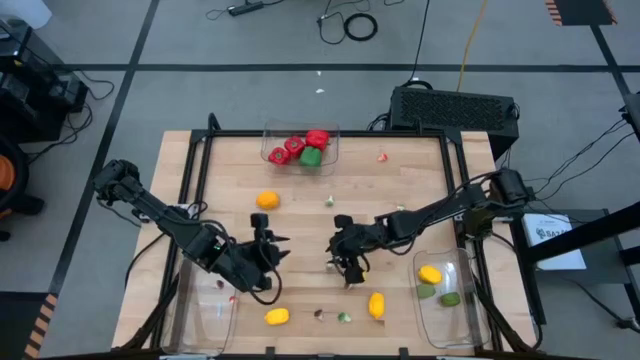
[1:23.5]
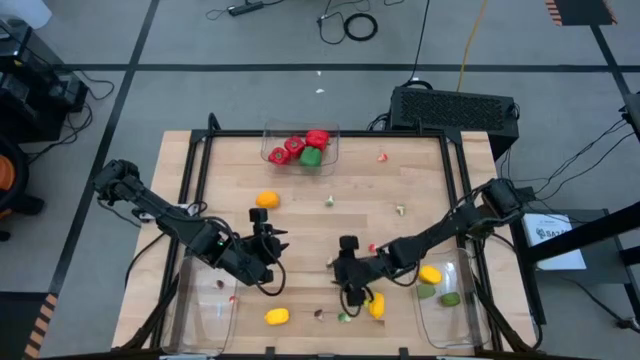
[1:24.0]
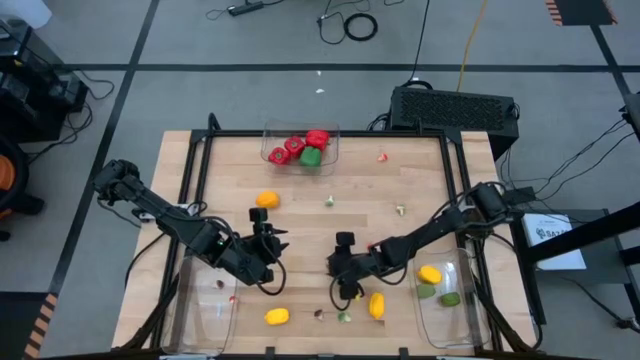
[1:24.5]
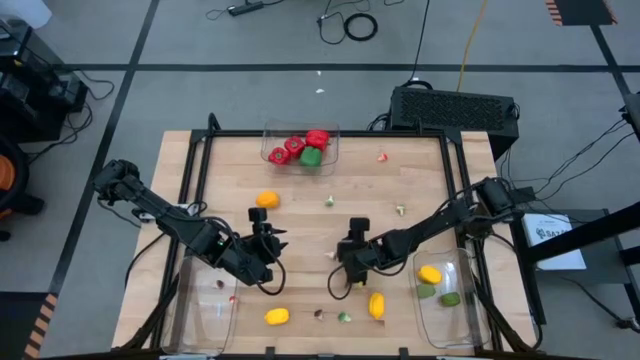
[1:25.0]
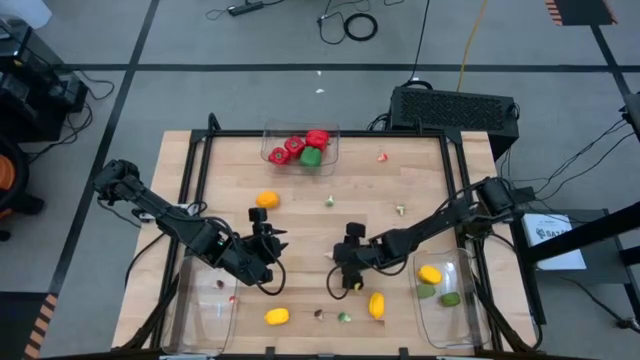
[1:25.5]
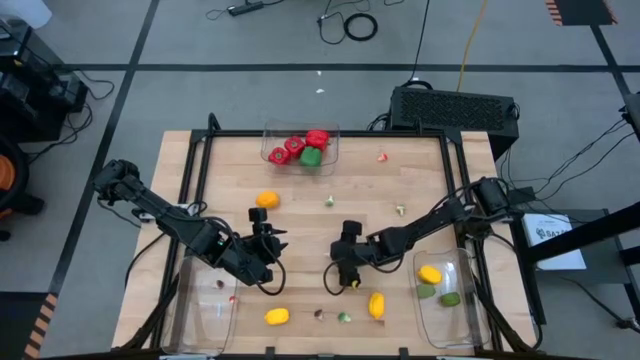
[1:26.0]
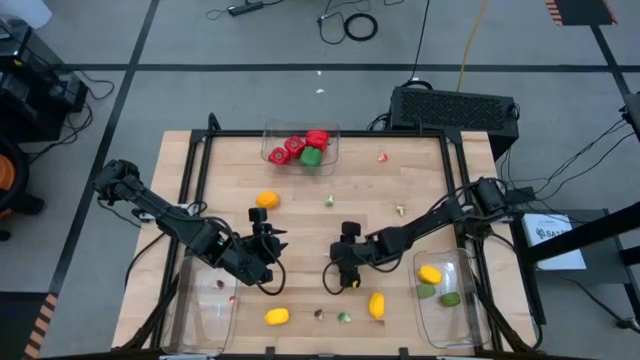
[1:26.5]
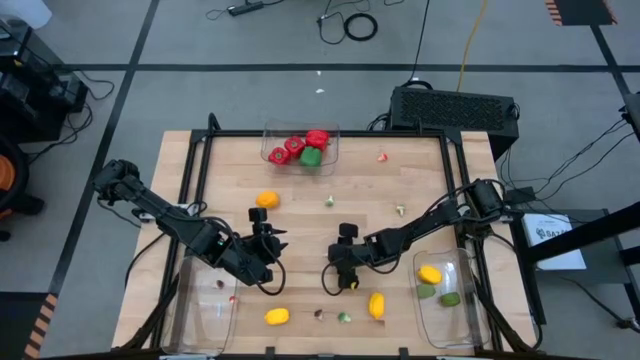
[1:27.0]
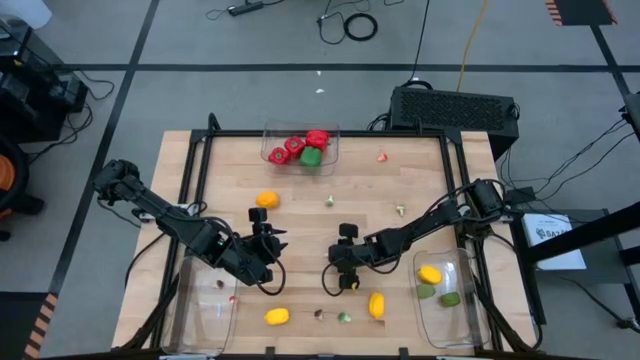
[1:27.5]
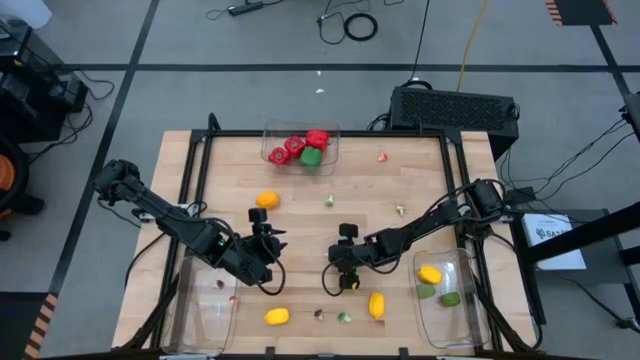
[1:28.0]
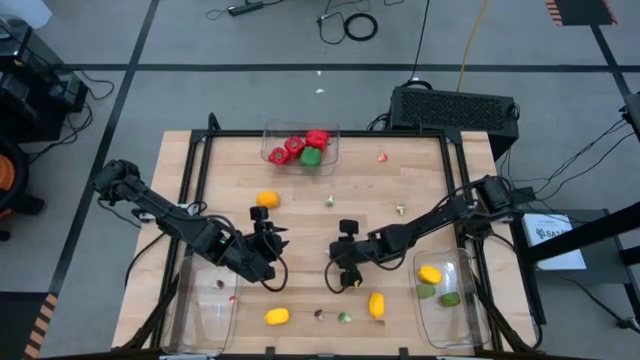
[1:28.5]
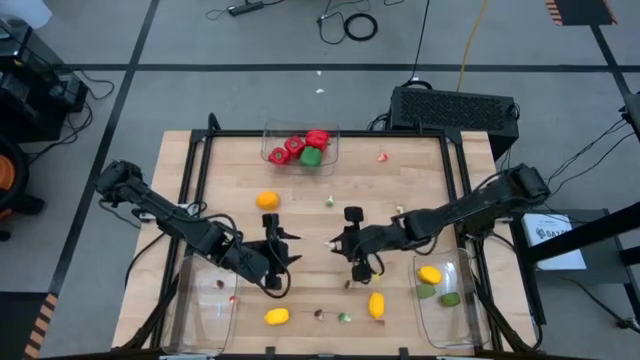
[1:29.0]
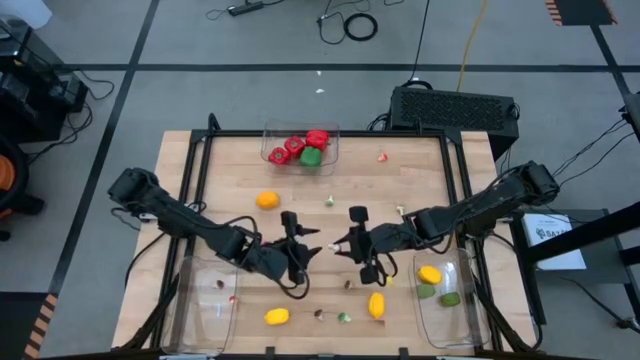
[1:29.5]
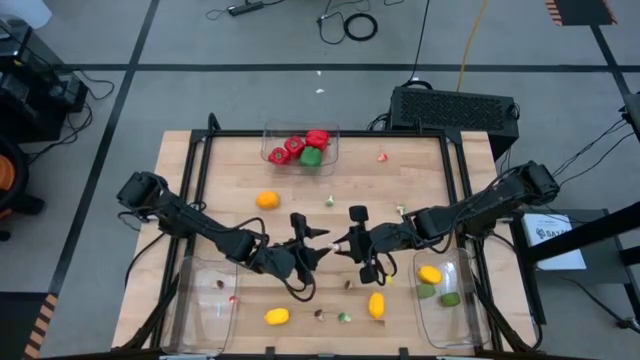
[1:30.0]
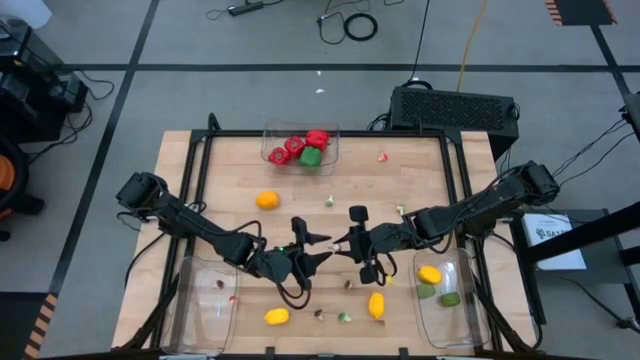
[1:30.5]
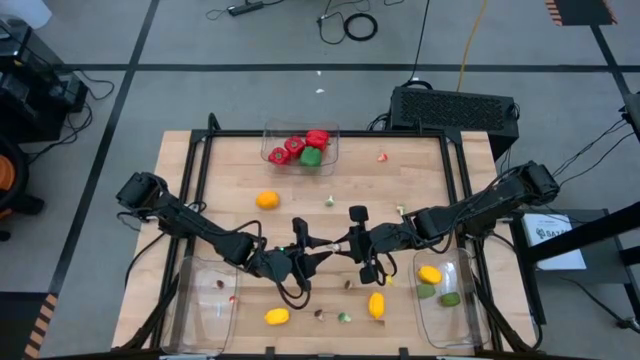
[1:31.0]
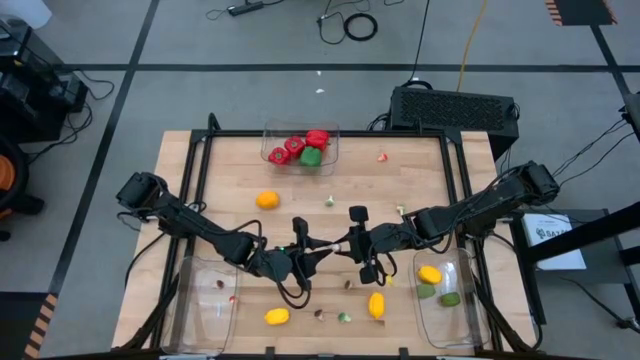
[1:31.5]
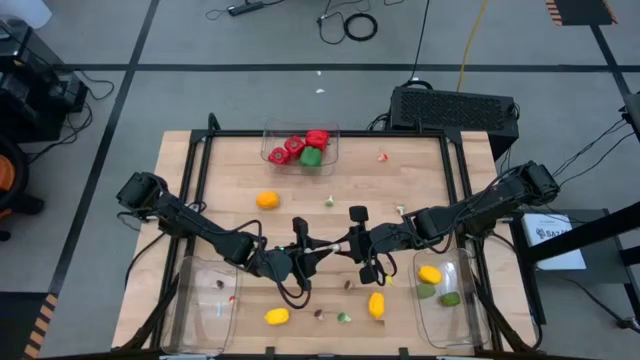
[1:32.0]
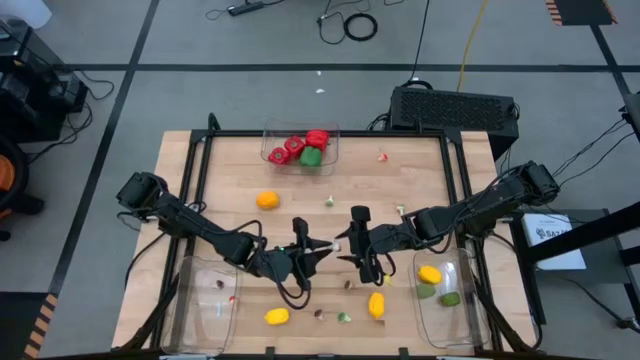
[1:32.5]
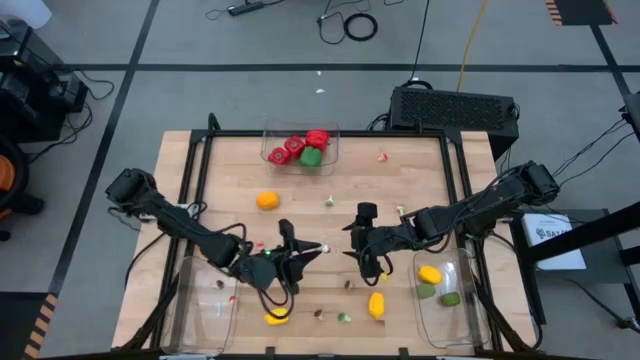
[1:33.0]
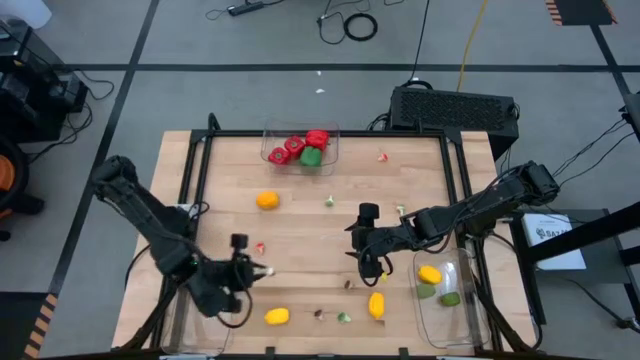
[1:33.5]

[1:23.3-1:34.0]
Task: Sort produce into baskets
Put the brown mushroom into the bottom left transparent bin

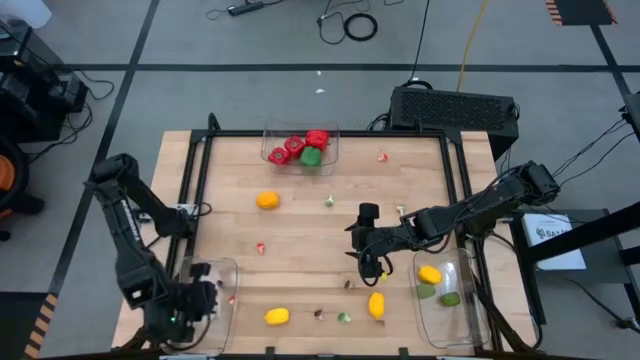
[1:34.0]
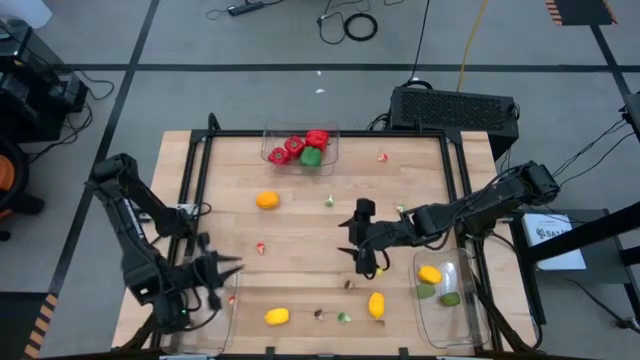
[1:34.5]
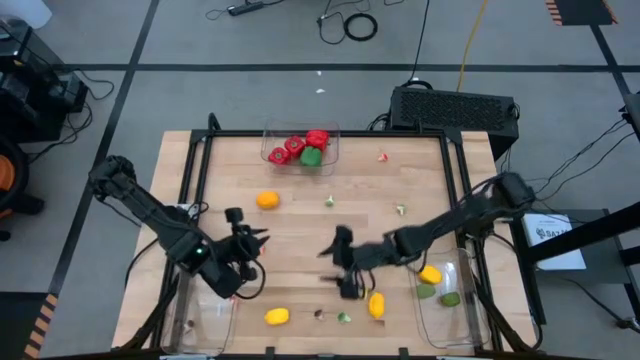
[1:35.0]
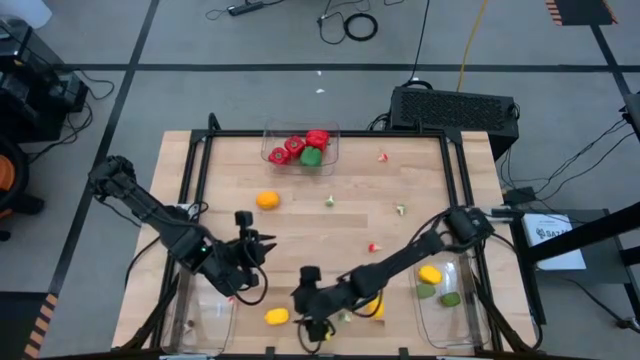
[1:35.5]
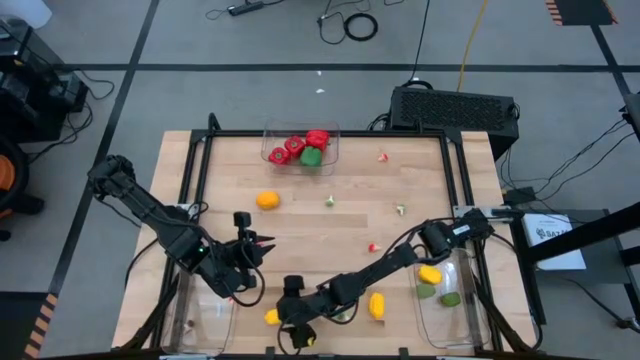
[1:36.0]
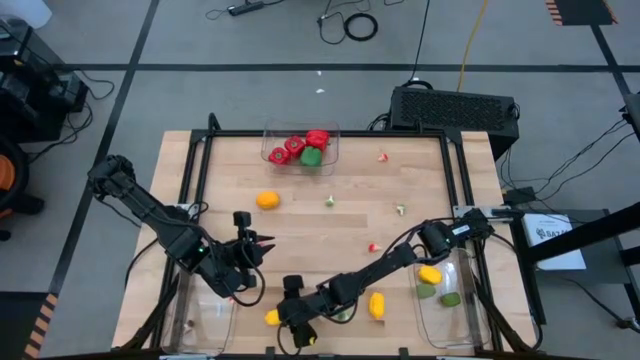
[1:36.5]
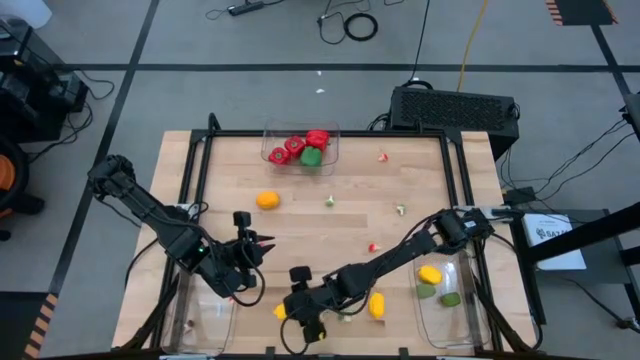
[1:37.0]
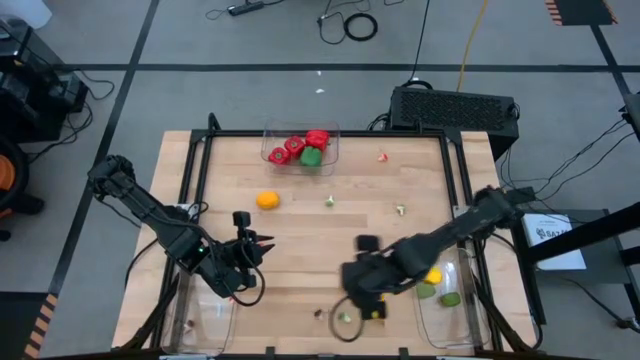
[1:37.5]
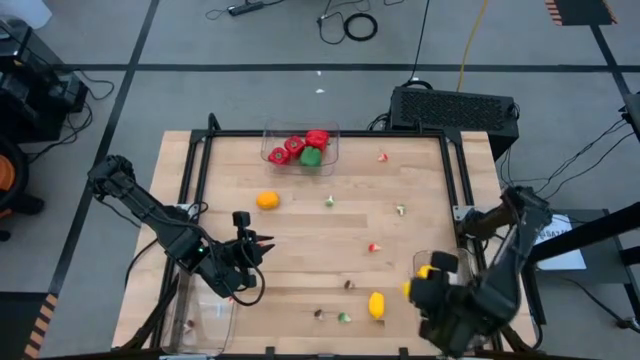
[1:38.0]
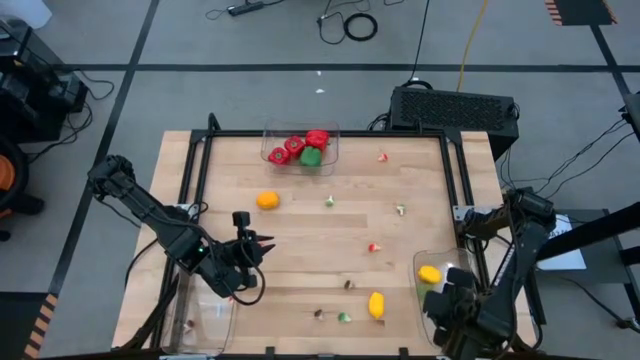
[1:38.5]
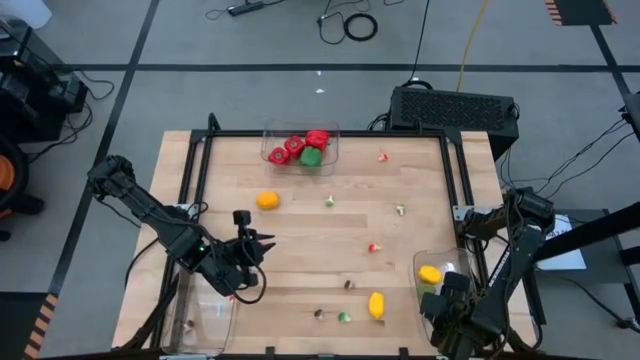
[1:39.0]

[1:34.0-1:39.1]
Put the yellow lemon into the bottom right transparent bin

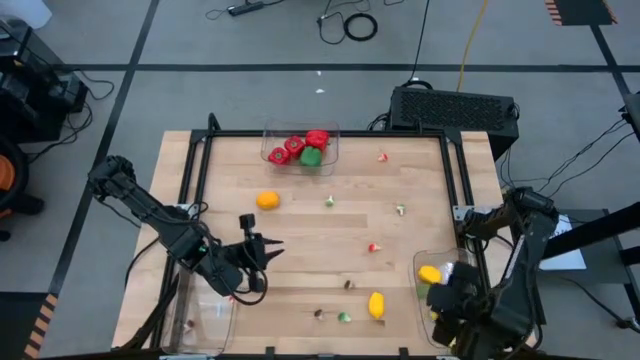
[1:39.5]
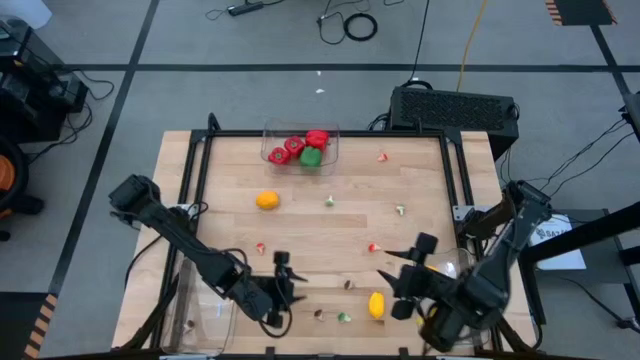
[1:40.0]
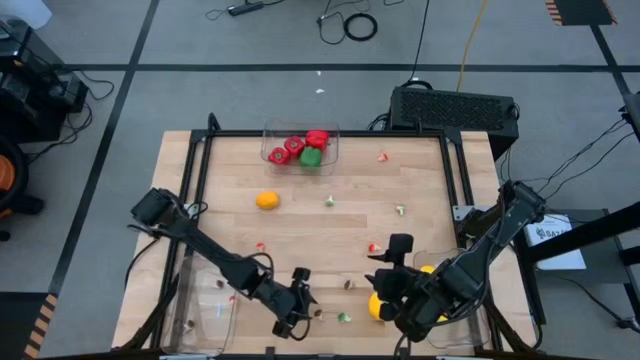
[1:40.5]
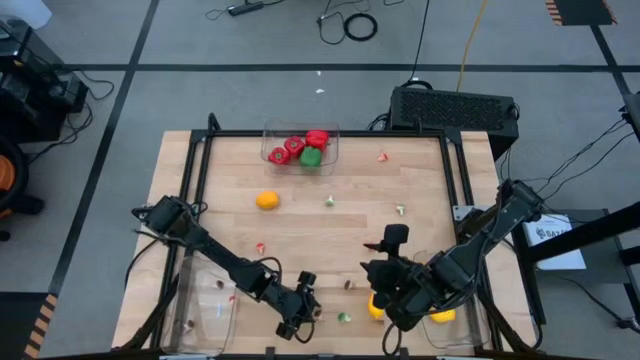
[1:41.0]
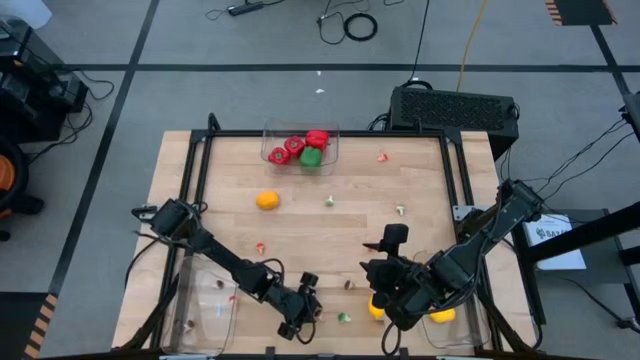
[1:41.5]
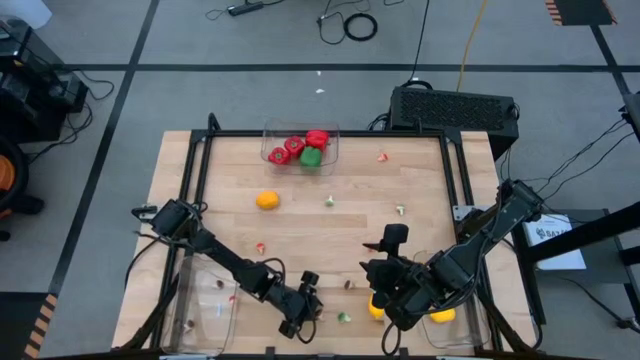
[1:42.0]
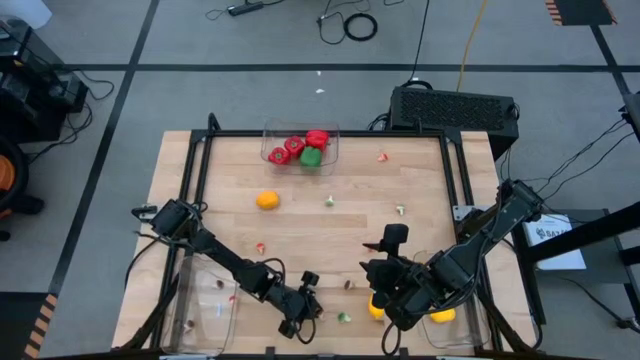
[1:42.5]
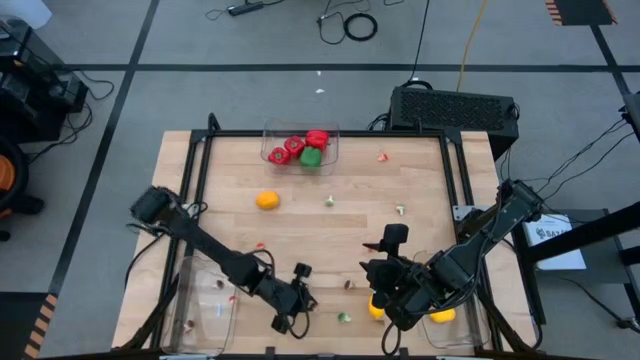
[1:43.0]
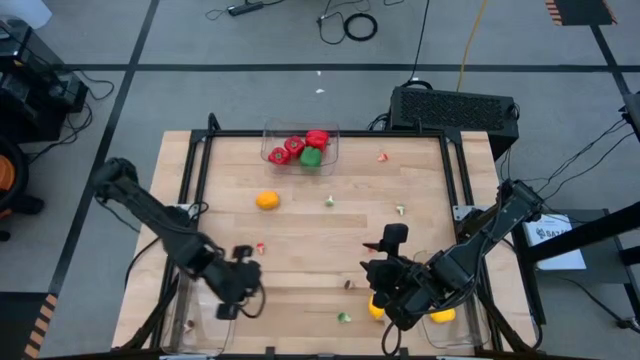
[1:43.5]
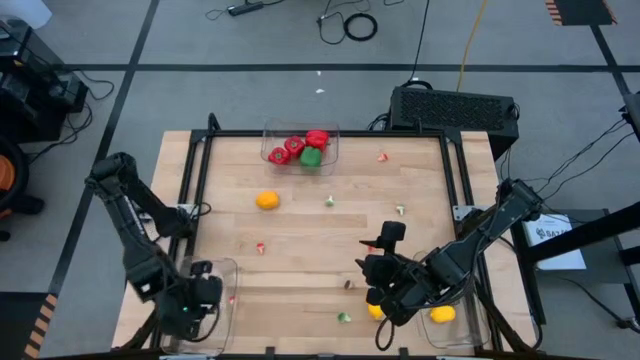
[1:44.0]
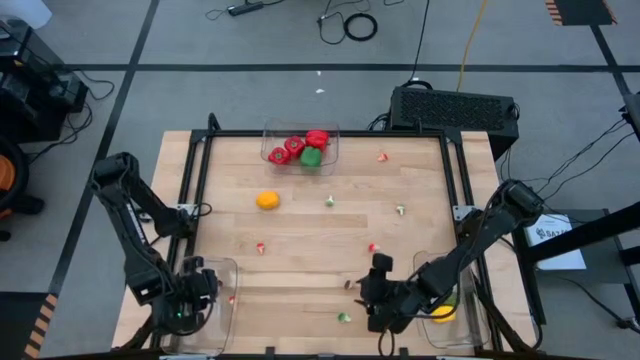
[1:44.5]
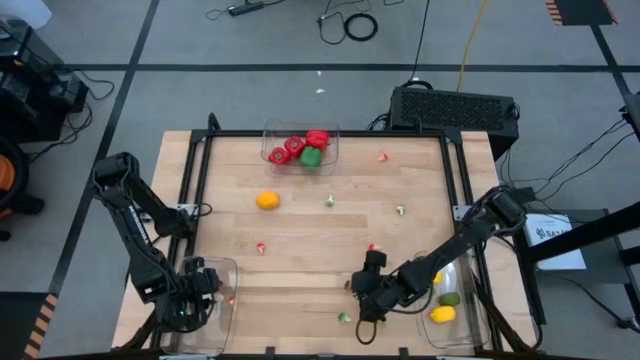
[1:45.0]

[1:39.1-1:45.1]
Put the brown mushroom into the bottom left transparent bin
